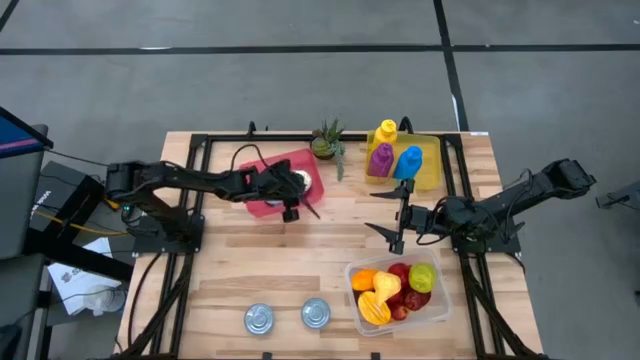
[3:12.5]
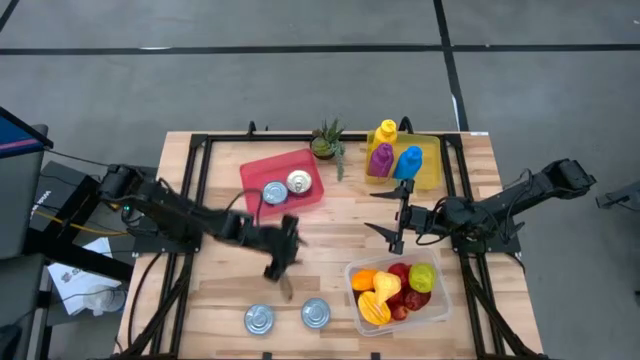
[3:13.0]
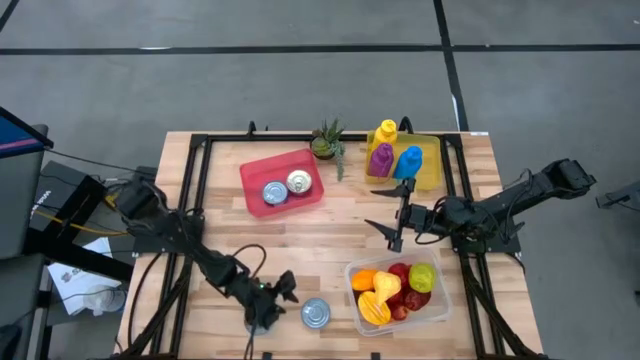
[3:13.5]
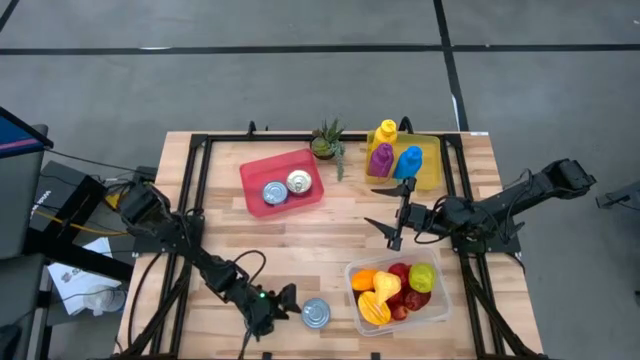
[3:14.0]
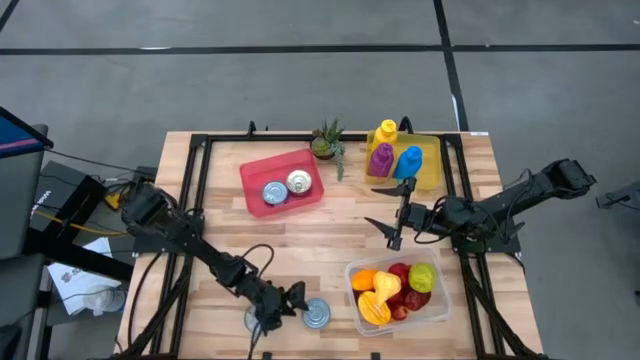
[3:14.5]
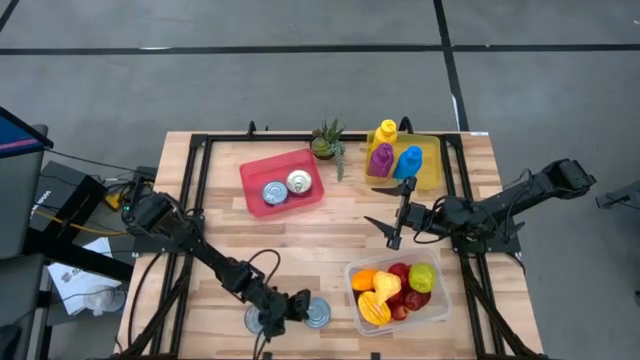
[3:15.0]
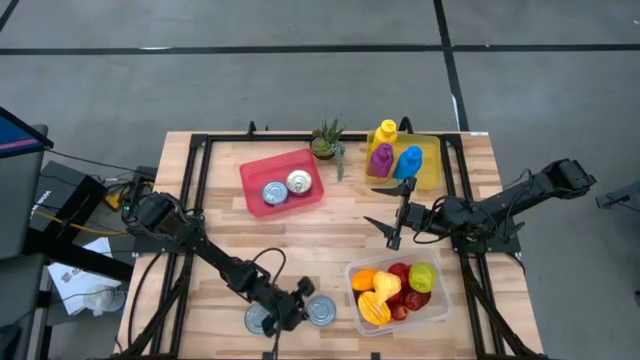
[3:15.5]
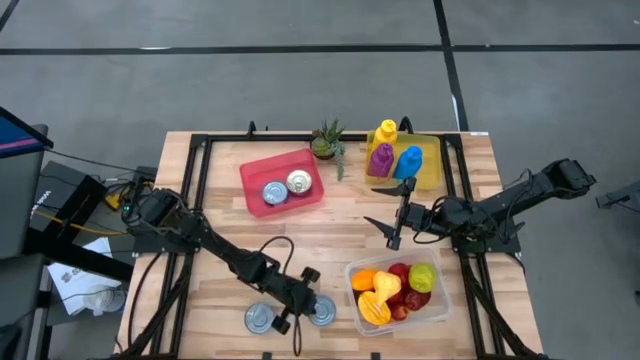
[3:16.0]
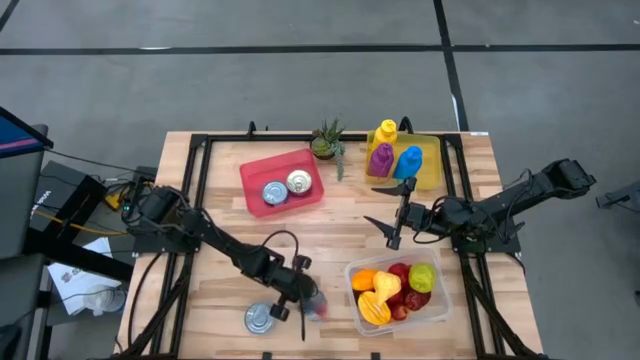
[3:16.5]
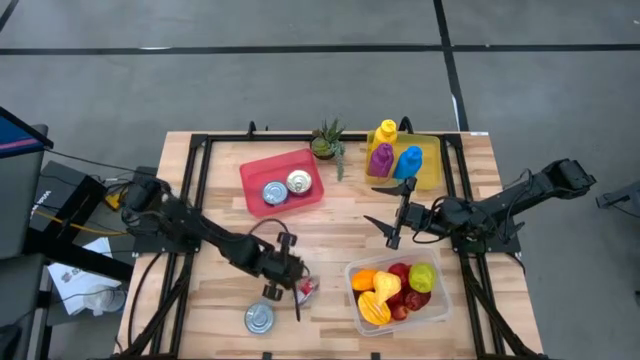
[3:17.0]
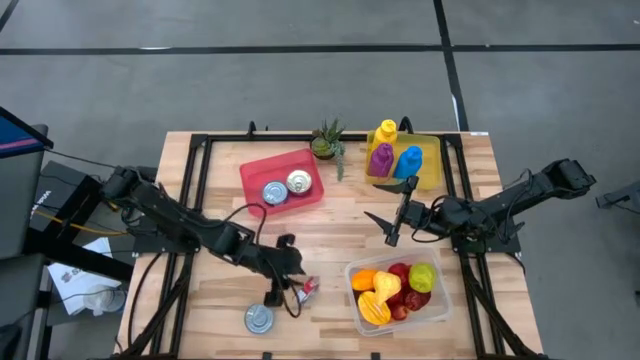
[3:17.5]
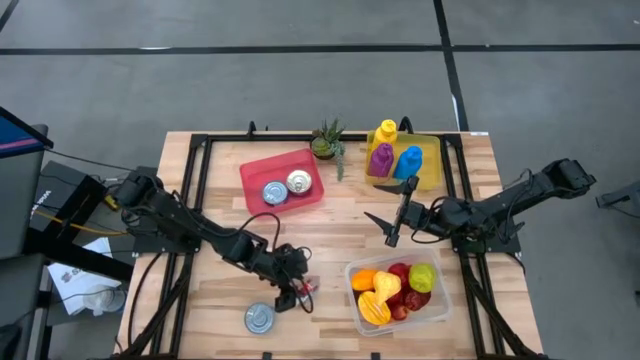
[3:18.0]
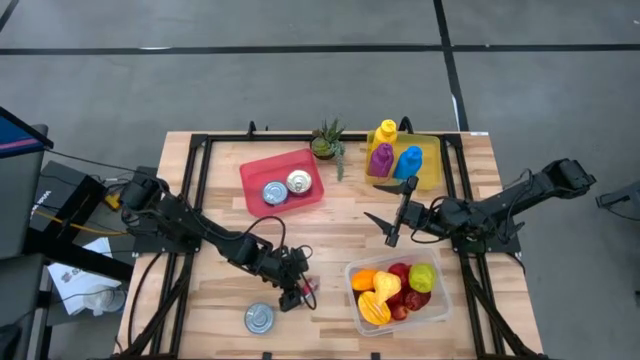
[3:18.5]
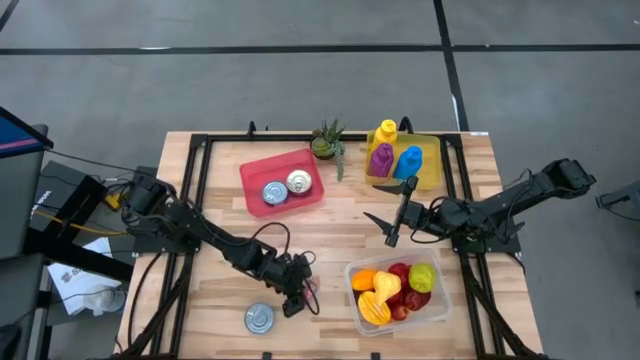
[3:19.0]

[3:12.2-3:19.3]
Task: Pick & Place Food Item
Put the red tuna can into the red bin

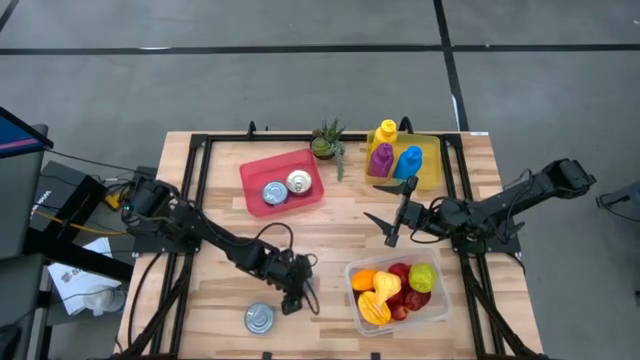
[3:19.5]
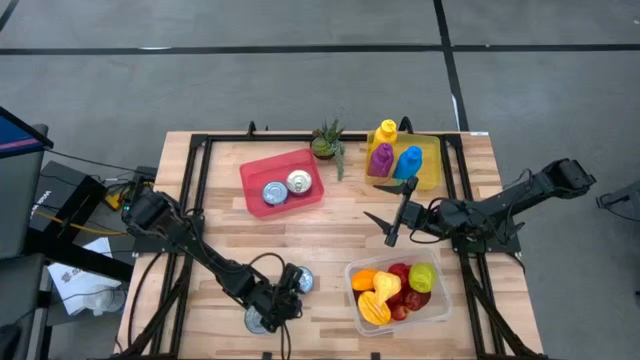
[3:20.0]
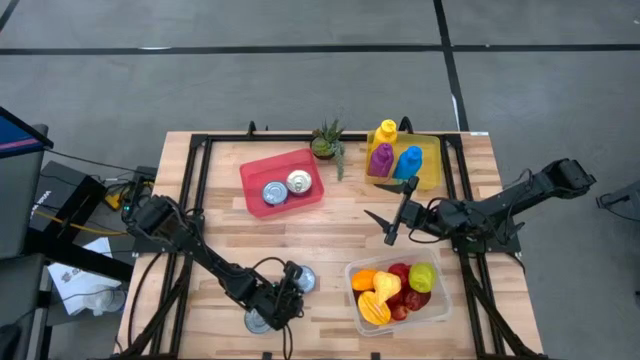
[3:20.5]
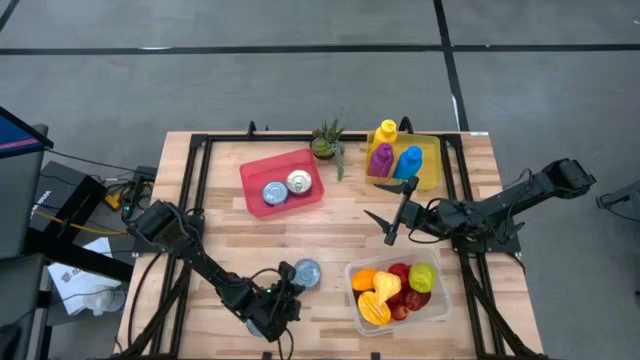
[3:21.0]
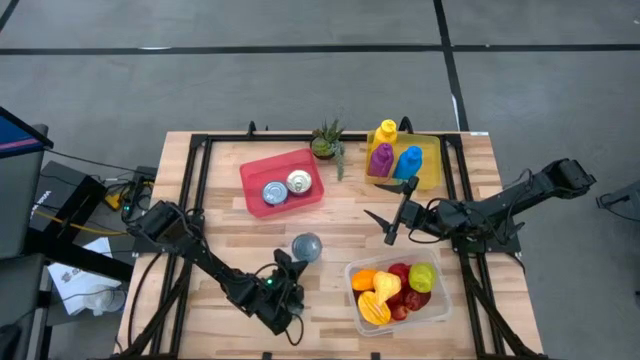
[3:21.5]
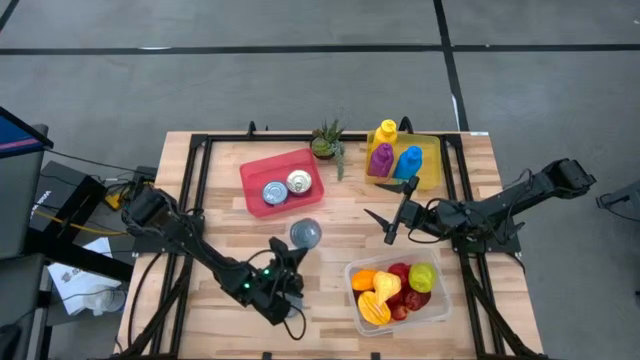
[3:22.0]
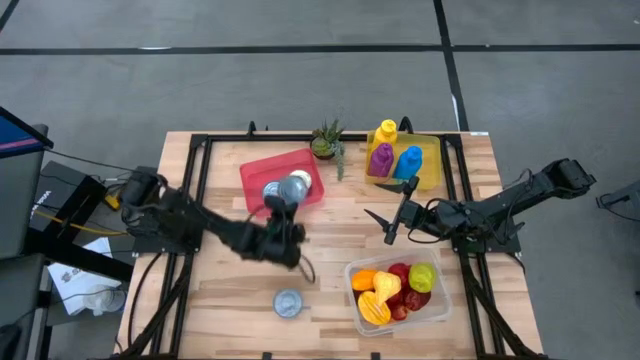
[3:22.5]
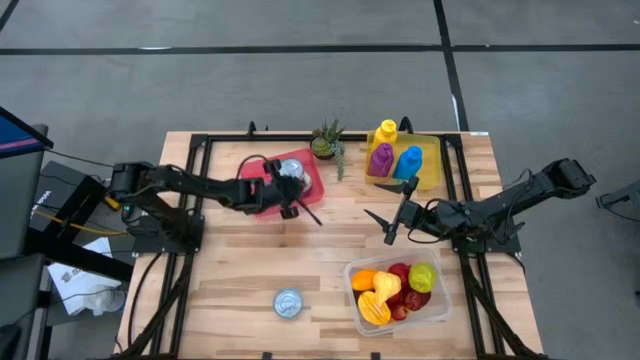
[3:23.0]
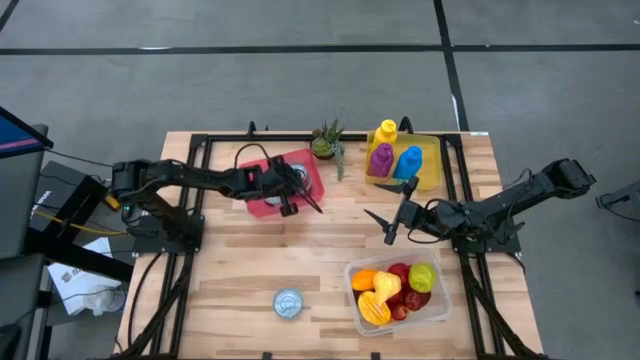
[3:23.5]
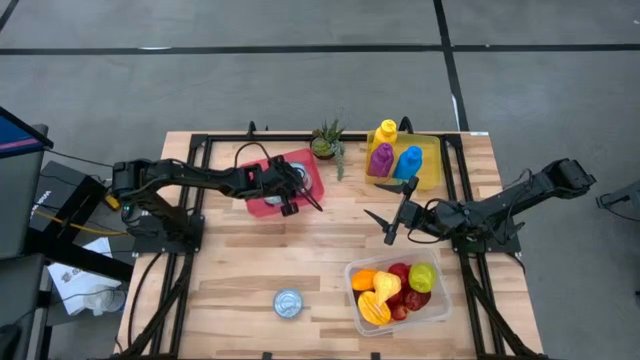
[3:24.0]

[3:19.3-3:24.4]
Put the red tuna can into the red bin

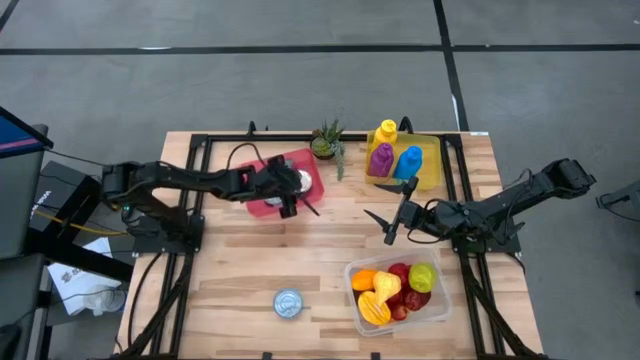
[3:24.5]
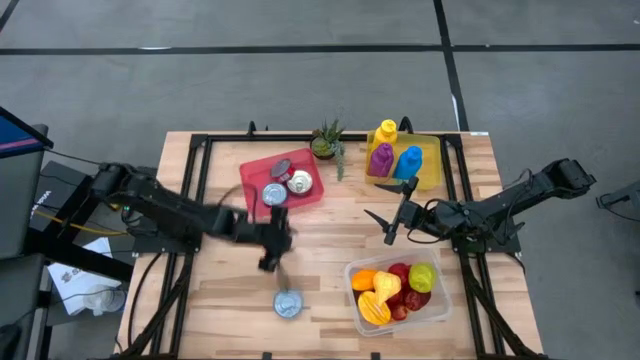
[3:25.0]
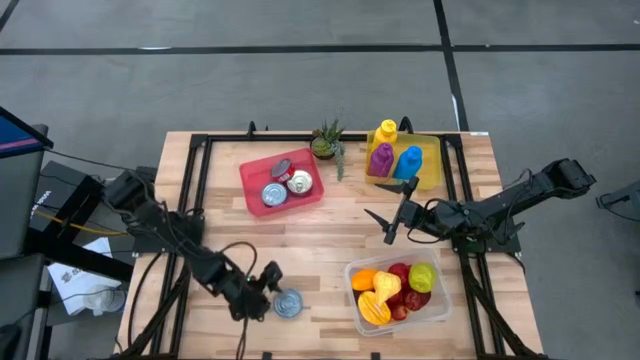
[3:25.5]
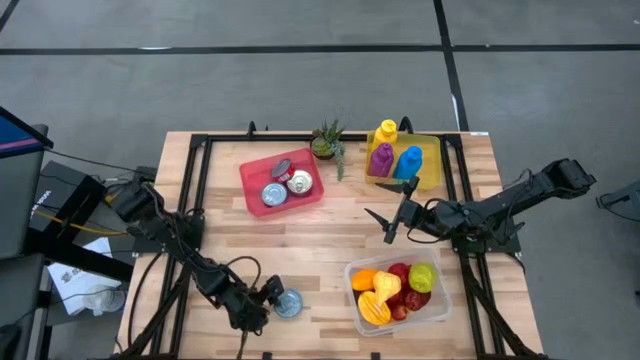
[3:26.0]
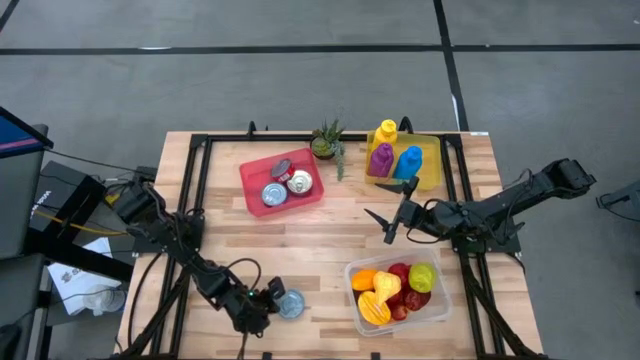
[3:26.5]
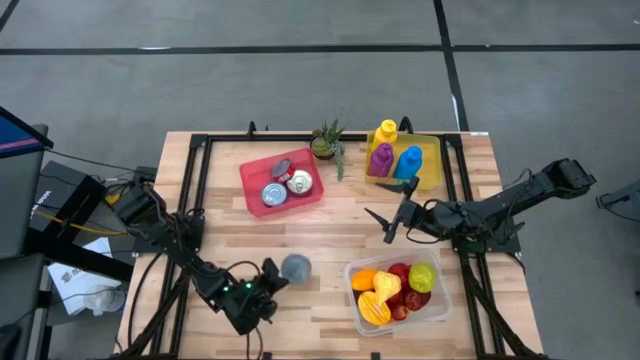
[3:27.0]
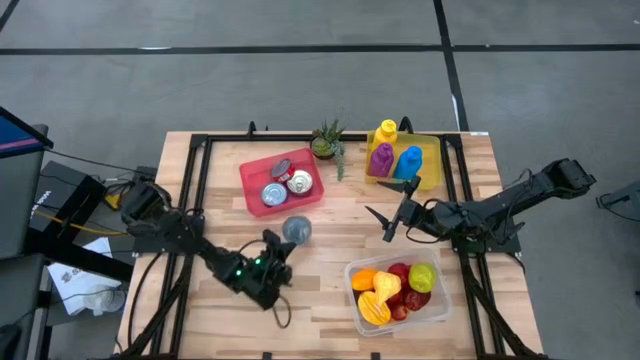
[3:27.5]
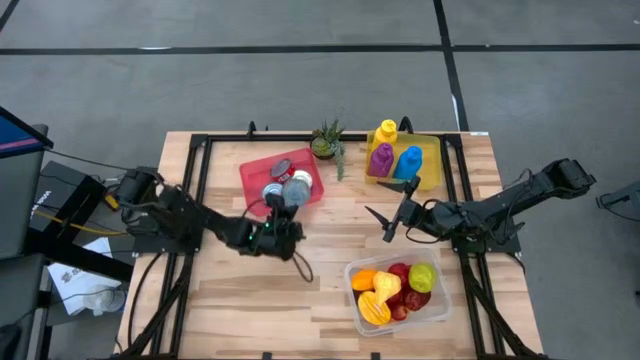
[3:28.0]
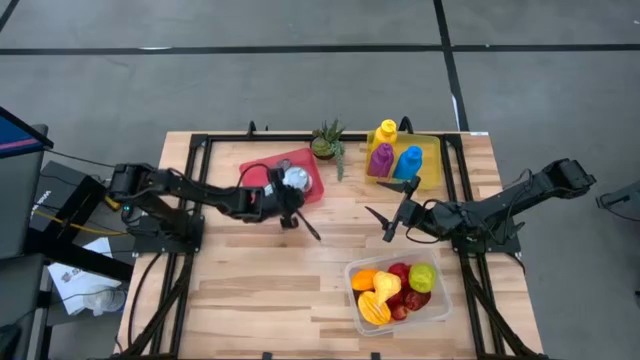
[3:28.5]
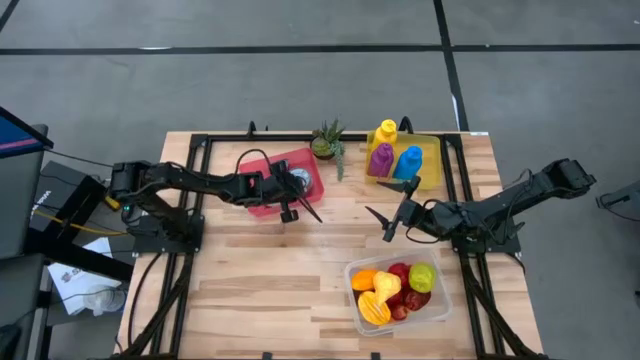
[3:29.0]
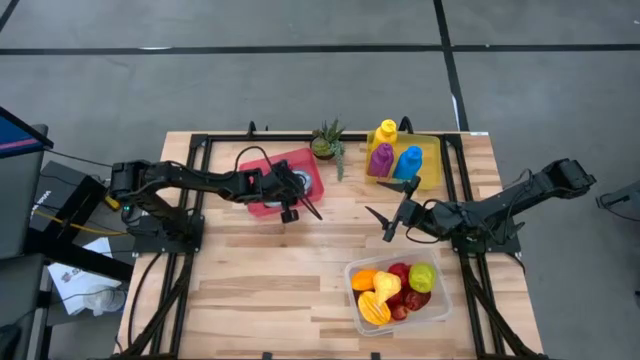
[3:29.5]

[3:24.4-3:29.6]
Put the green tuna can into the red bin

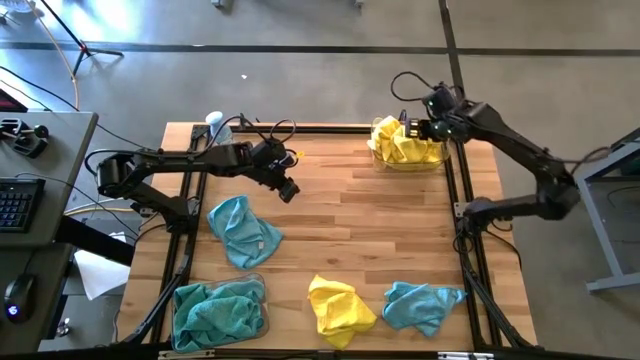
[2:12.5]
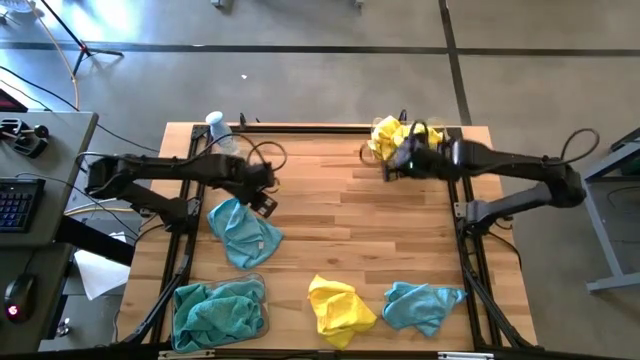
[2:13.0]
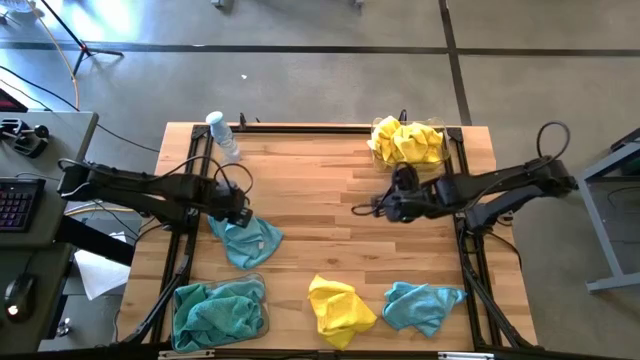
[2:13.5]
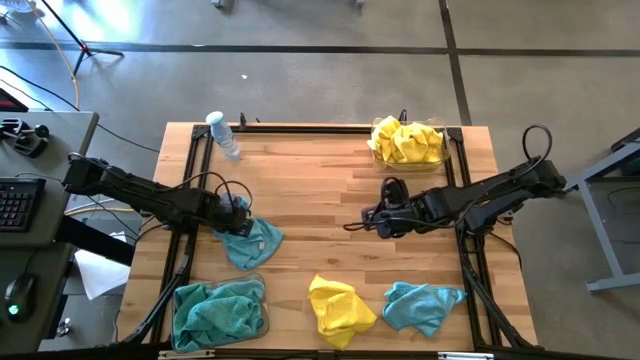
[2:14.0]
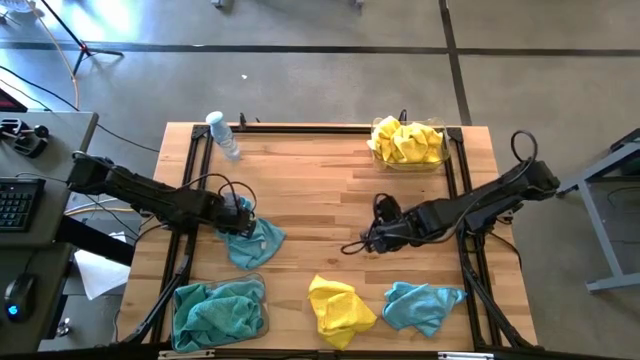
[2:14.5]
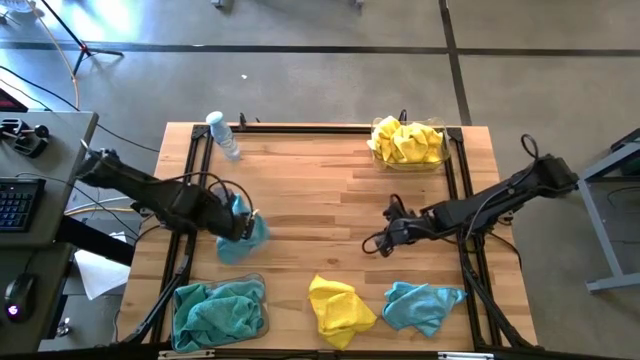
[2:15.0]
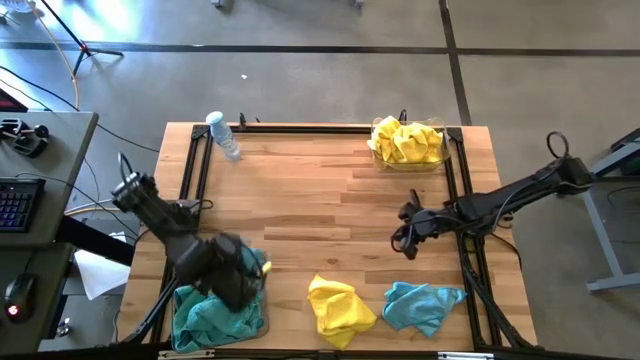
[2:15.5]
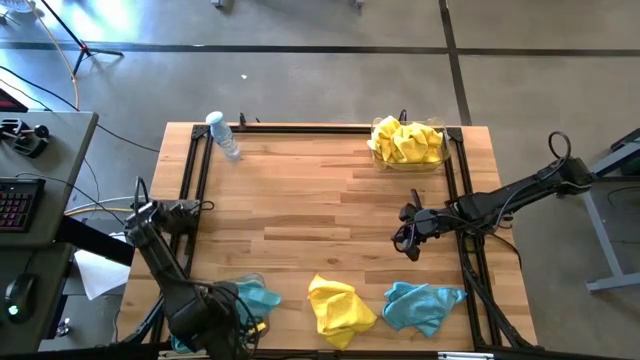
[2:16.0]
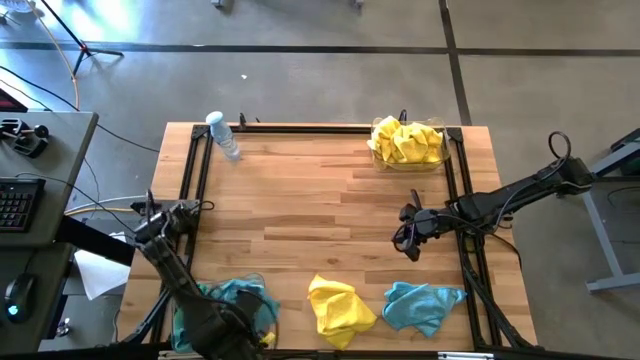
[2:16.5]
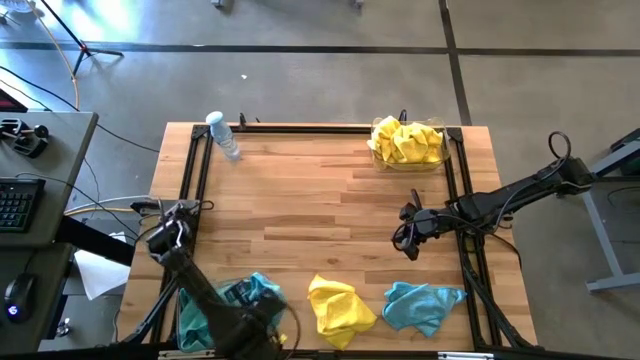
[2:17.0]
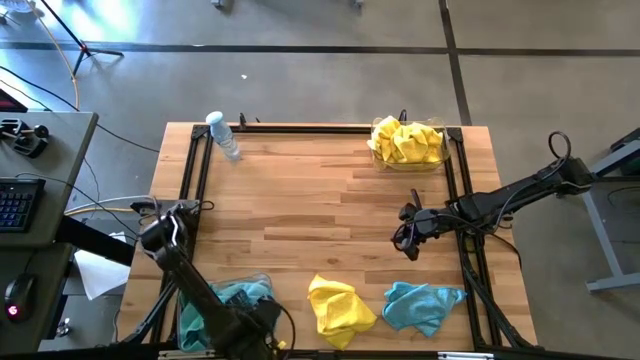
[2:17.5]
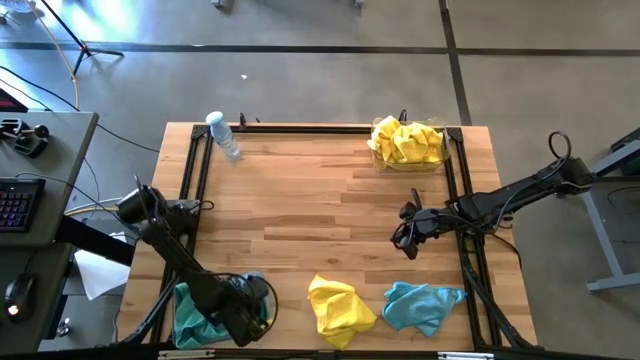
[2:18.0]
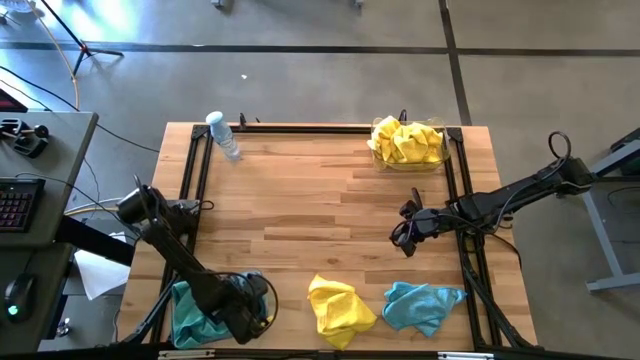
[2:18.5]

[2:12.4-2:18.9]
Task: Sort microfiber towel by color & place in baskets
Put the blue microfiber towel into the bottom transparent bin
